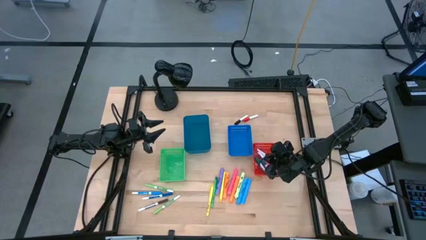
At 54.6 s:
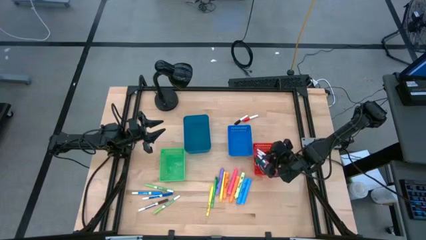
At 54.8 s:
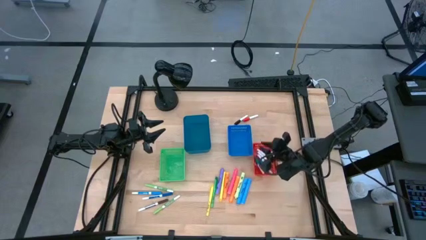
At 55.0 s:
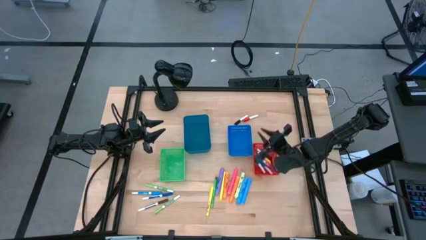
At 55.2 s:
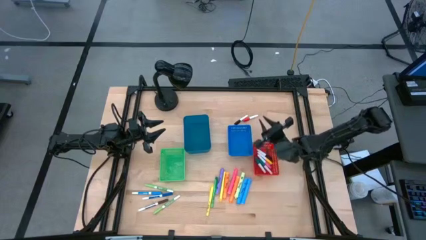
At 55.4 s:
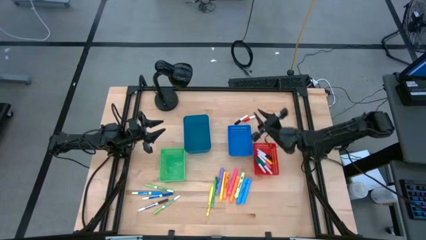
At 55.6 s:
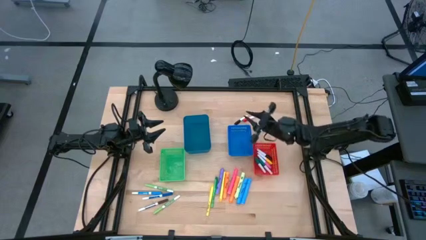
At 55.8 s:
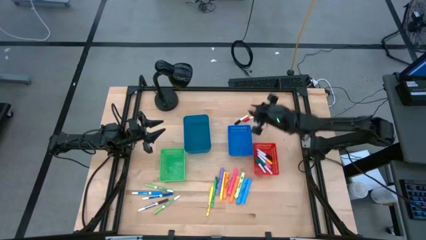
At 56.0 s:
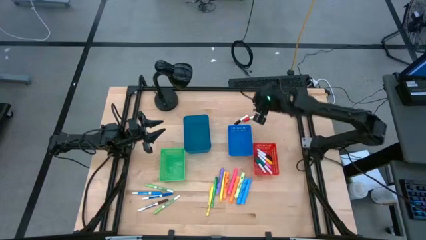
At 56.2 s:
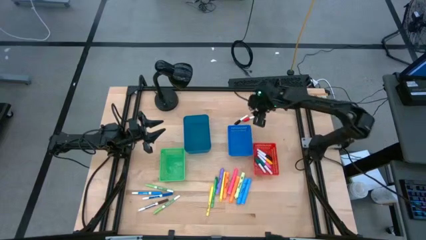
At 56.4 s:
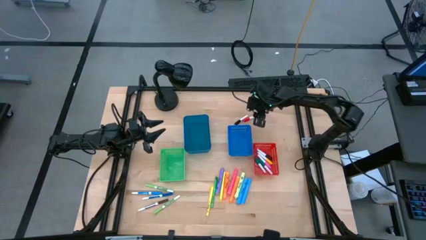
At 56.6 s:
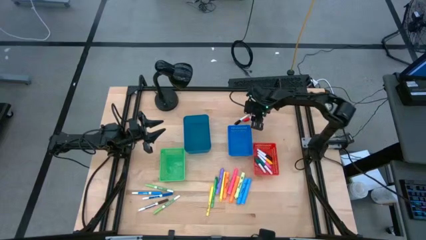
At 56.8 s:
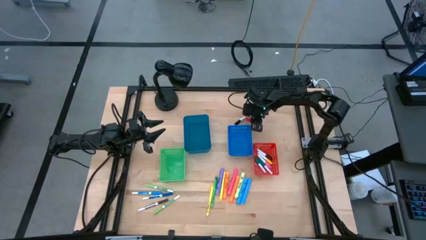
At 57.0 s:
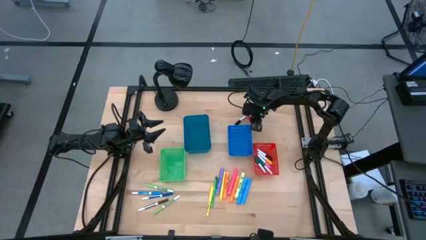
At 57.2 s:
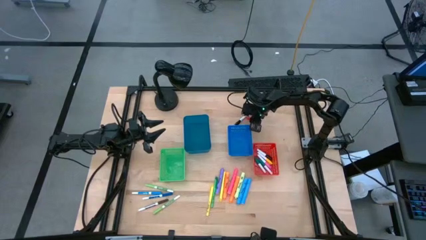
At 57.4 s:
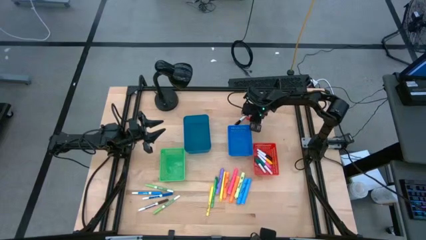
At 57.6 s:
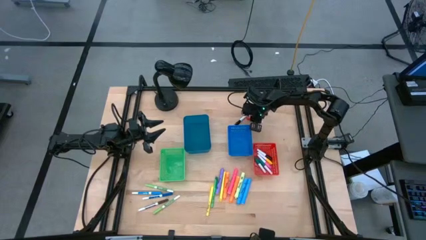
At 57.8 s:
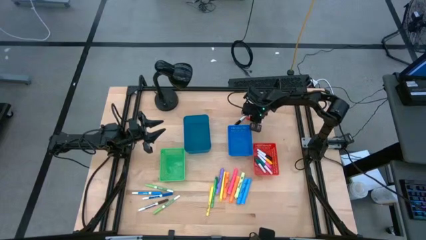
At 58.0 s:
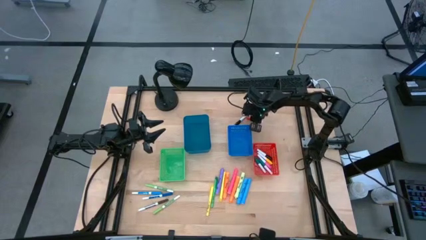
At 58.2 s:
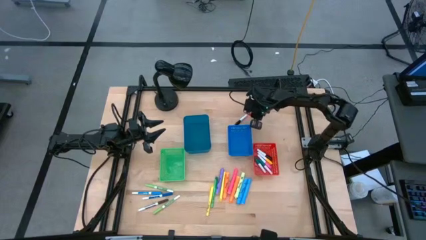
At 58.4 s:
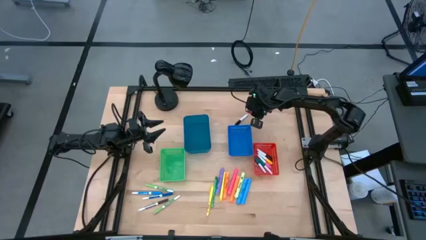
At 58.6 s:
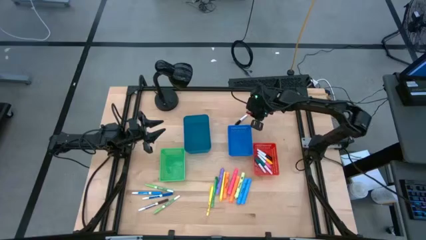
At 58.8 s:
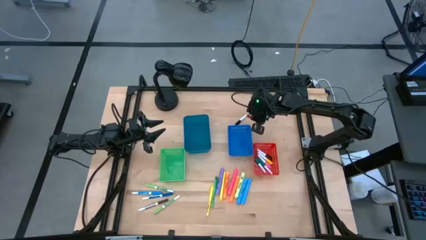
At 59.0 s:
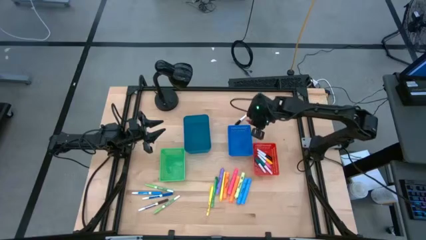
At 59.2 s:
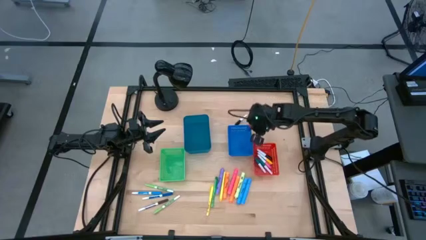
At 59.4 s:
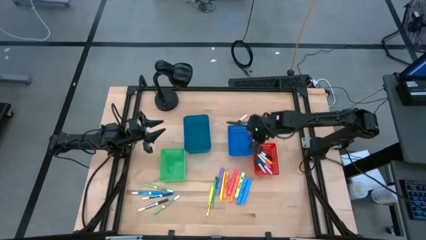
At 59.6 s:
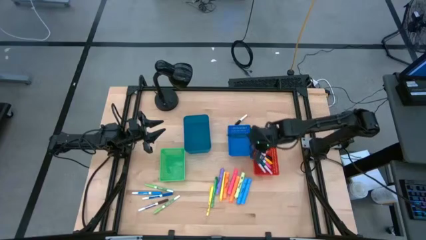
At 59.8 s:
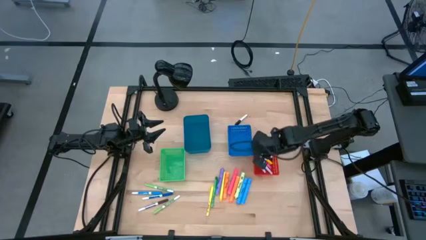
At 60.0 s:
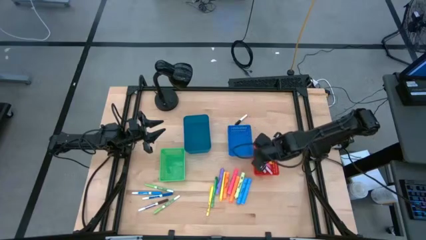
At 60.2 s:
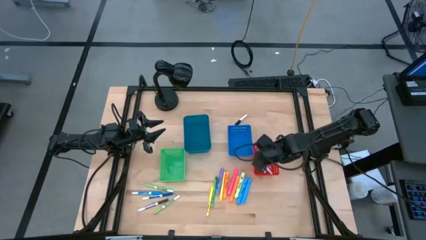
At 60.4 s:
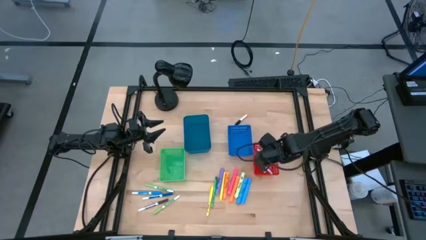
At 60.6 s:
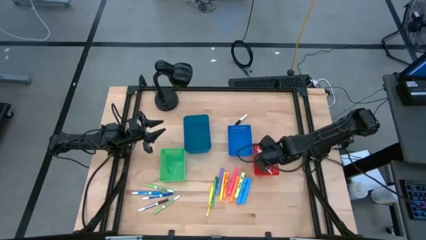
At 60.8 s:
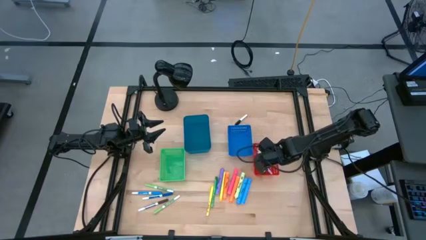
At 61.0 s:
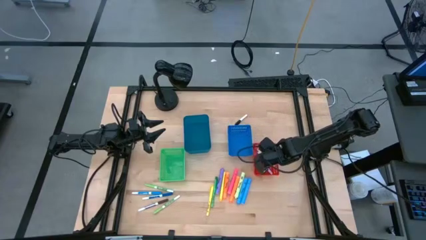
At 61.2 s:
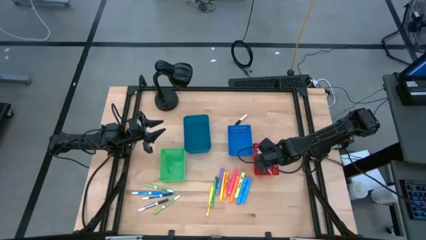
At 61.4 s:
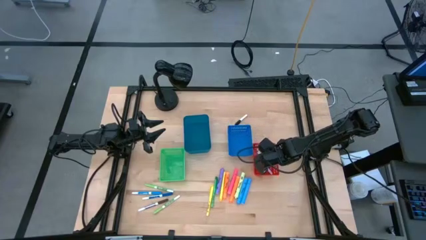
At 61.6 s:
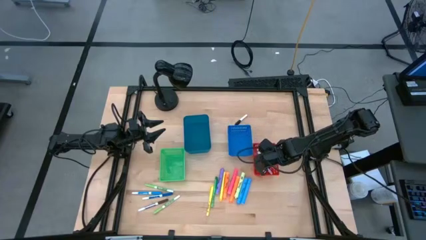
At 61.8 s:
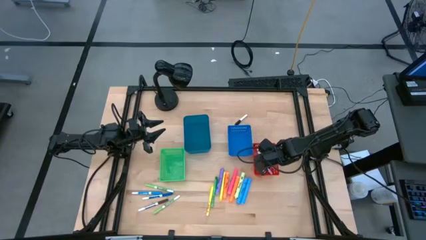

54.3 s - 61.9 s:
Task: Pick & Place Markers
Put the orange highlighter pen into the red bin

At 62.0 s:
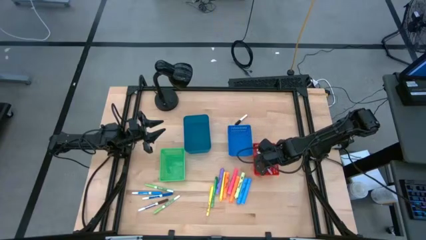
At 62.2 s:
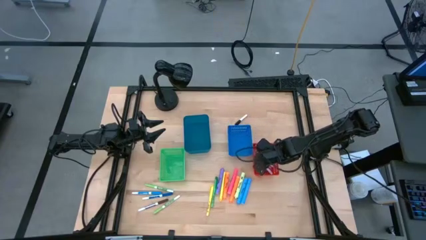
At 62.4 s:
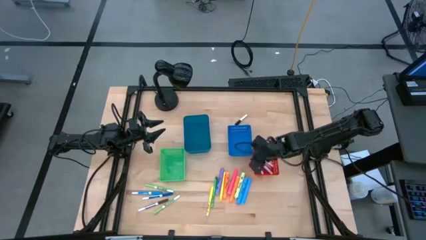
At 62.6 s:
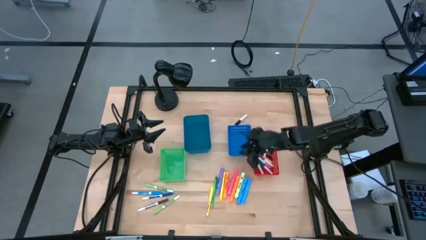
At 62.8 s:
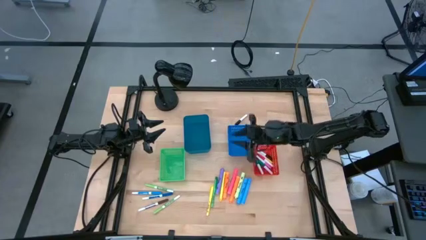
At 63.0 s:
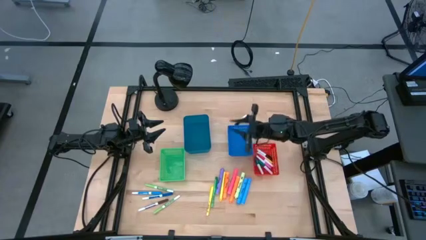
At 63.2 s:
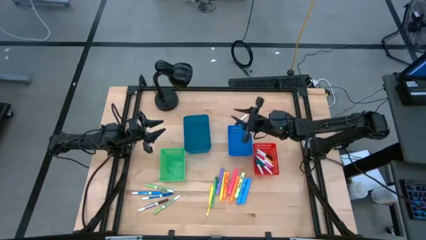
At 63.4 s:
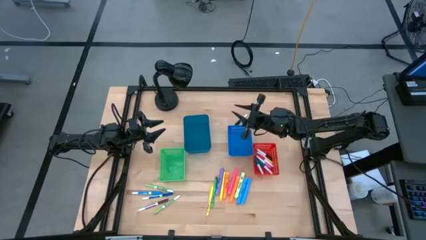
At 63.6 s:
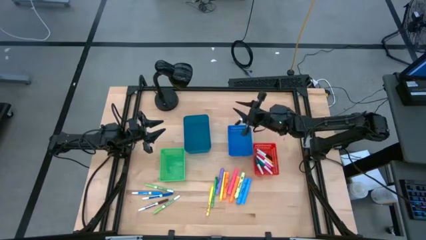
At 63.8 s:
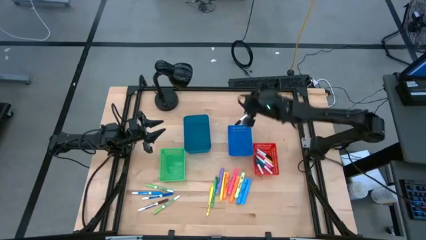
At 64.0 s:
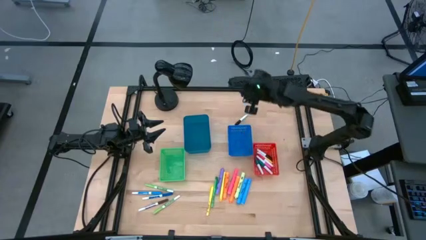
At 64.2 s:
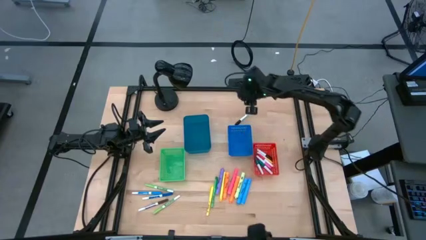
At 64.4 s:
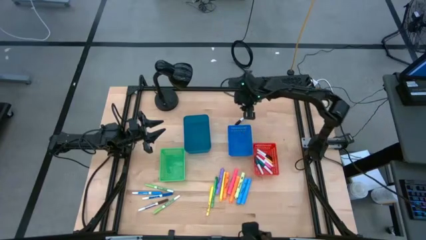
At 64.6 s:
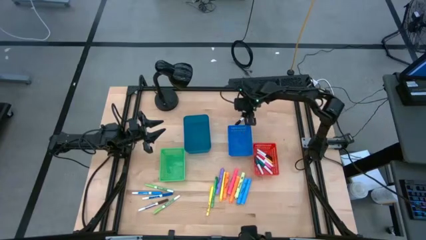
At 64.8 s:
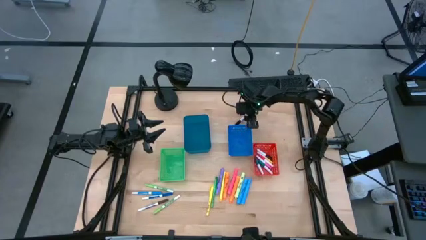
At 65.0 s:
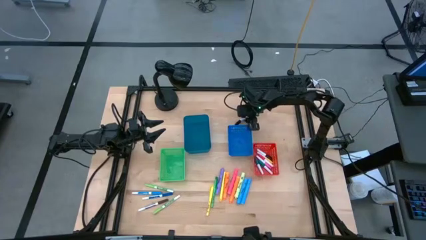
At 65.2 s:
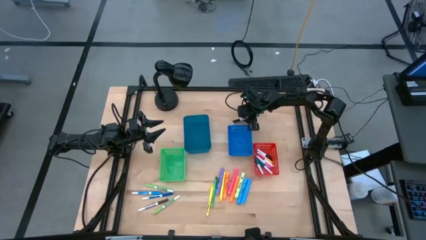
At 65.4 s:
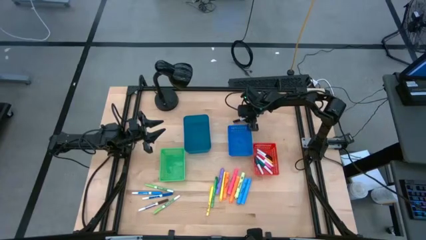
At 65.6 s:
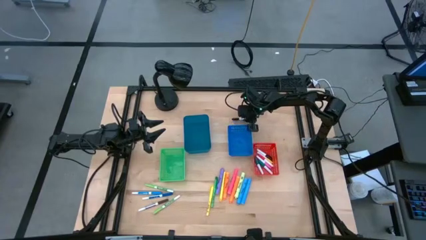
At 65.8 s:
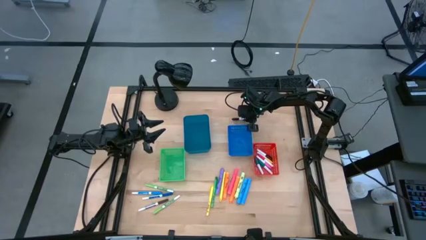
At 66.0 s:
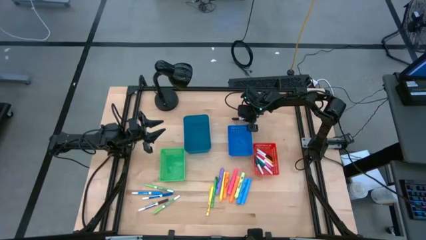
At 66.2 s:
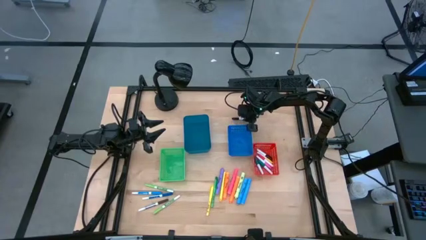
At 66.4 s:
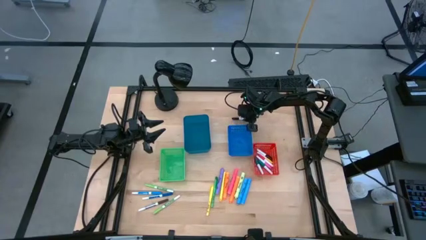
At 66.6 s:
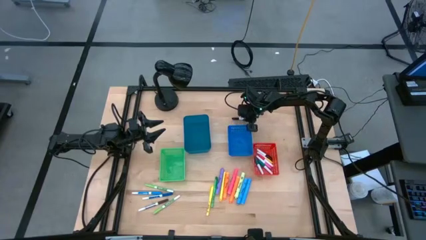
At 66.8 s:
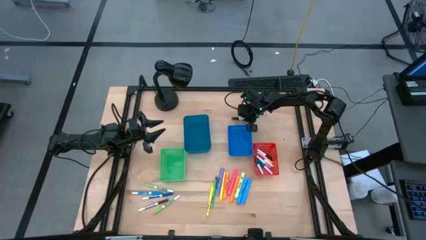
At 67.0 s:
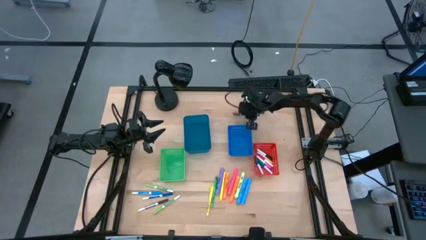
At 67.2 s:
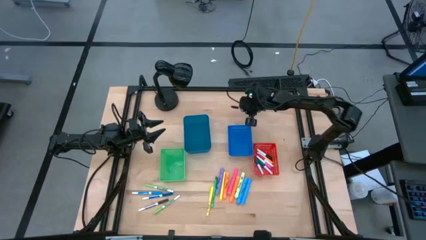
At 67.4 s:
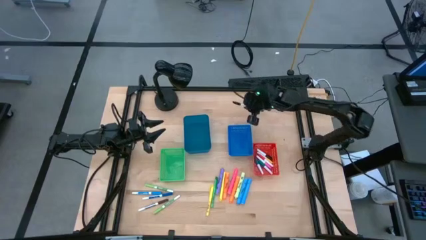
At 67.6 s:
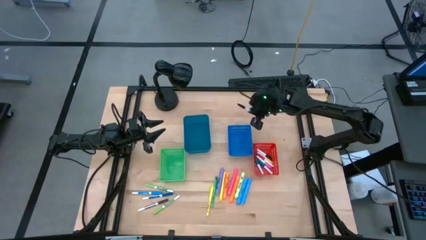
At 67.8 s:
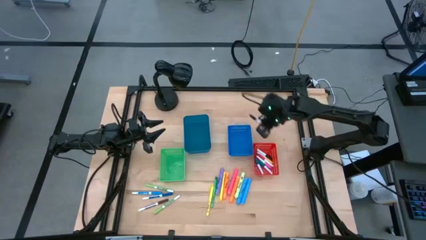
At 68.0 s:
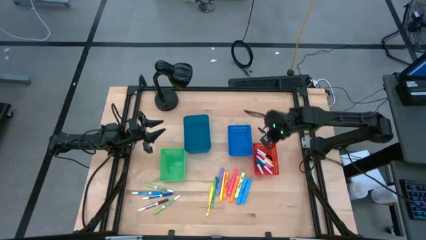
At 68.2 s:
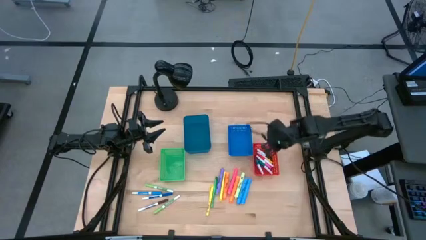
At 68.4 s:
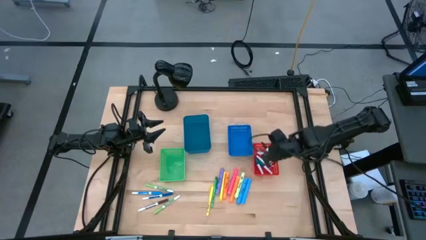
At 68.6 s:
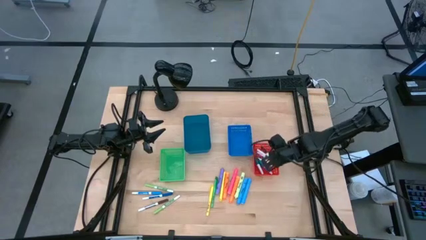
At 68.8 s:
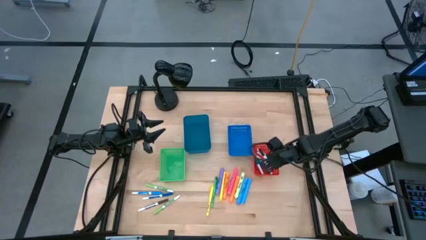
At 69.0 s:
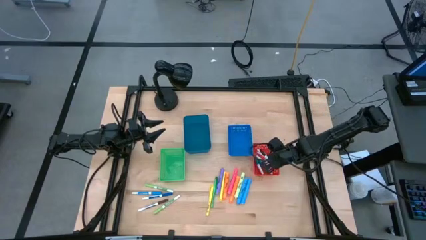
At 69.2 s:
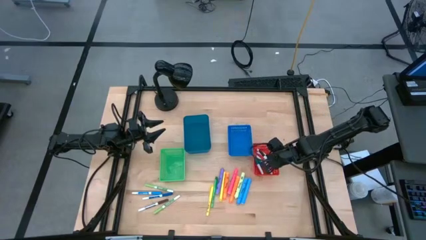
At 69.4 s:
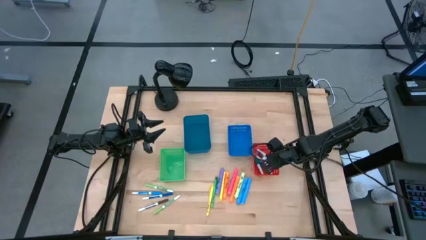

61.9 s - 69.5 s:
Put the black highlighter pen into the red bin
